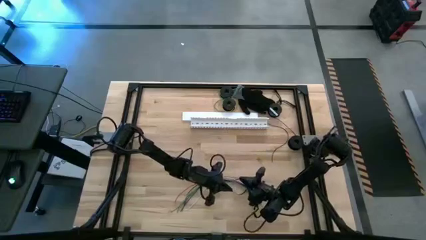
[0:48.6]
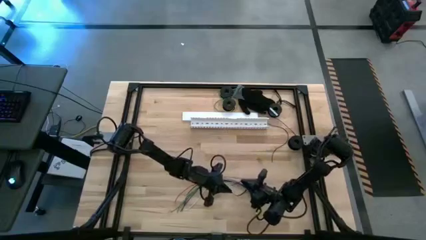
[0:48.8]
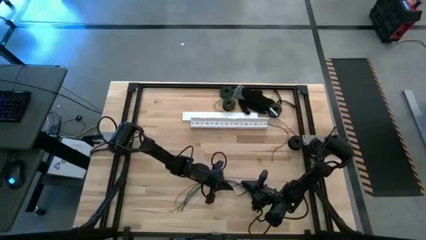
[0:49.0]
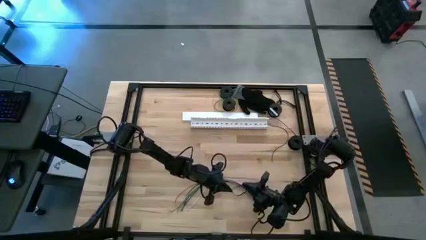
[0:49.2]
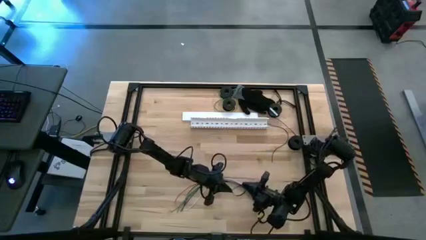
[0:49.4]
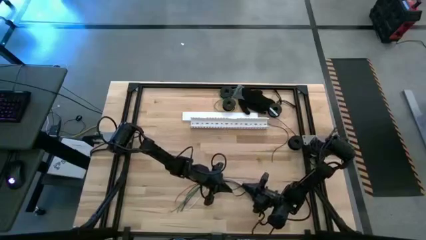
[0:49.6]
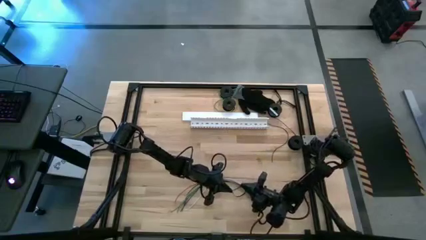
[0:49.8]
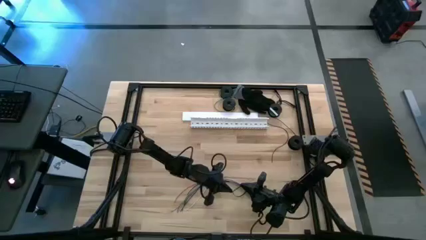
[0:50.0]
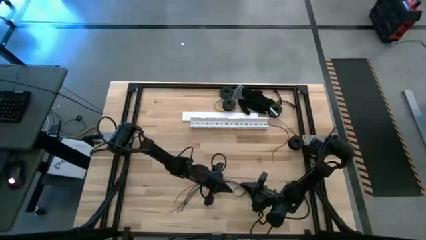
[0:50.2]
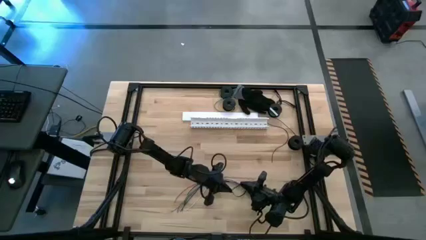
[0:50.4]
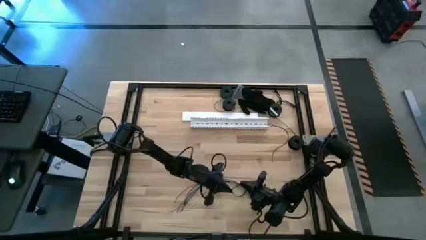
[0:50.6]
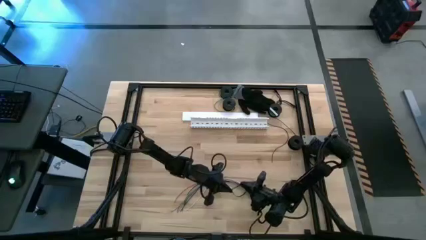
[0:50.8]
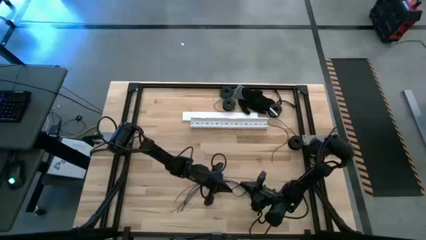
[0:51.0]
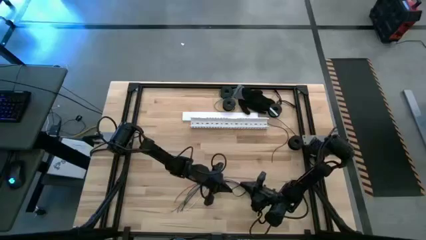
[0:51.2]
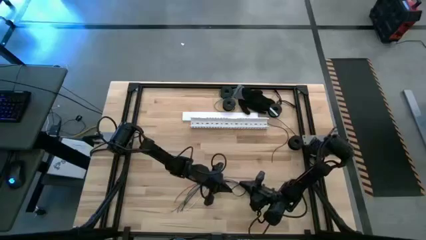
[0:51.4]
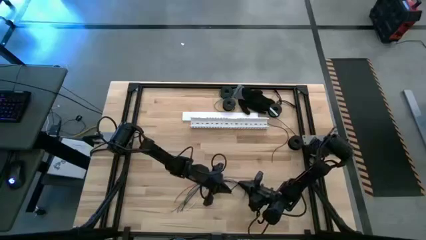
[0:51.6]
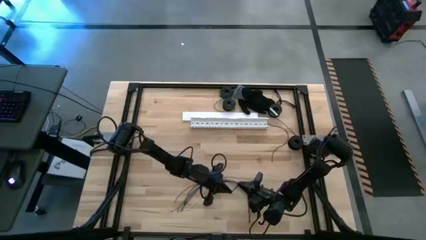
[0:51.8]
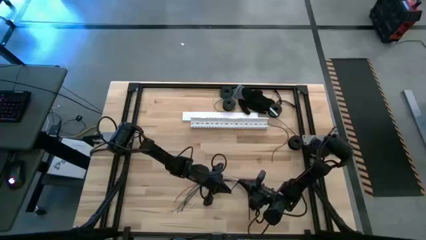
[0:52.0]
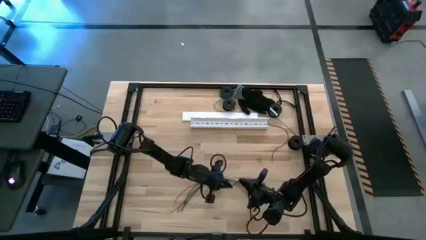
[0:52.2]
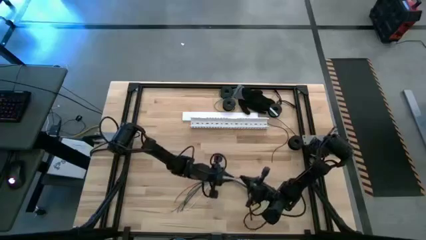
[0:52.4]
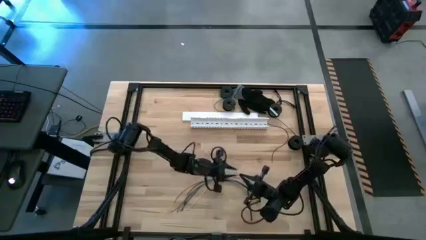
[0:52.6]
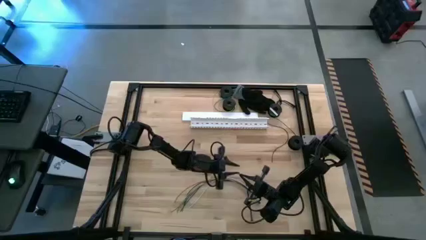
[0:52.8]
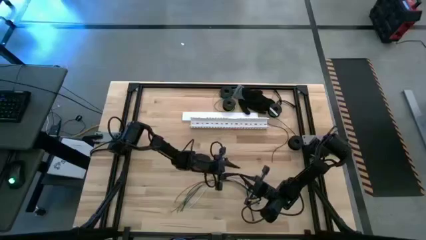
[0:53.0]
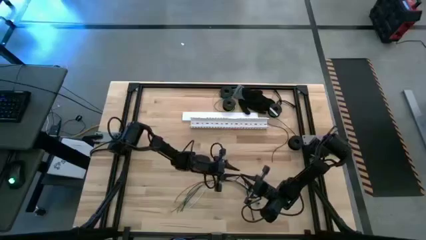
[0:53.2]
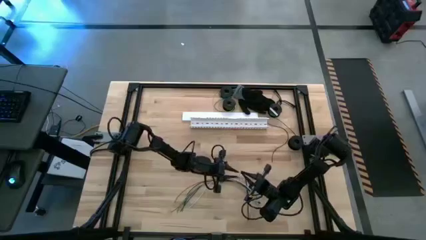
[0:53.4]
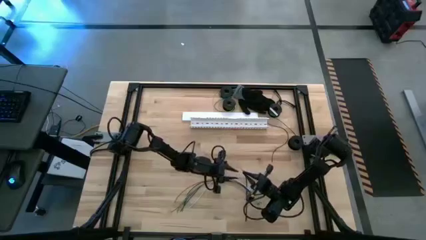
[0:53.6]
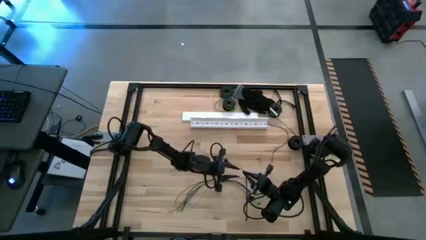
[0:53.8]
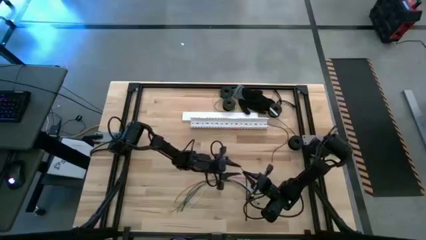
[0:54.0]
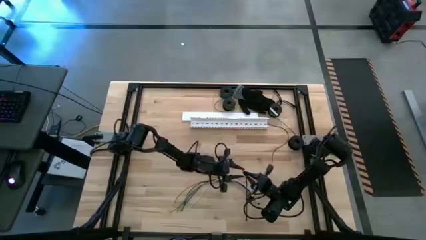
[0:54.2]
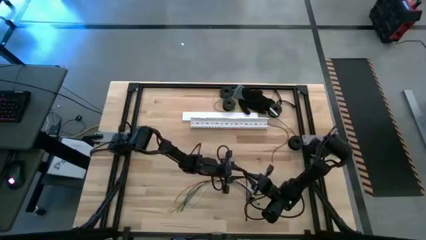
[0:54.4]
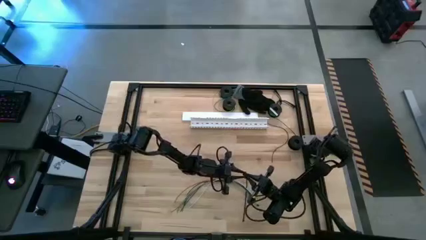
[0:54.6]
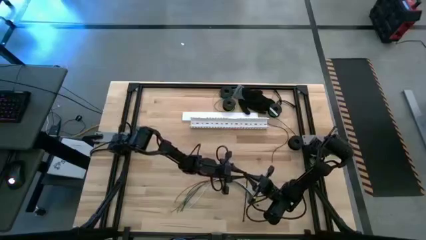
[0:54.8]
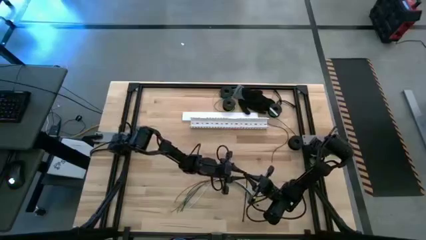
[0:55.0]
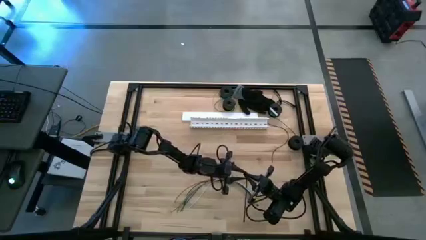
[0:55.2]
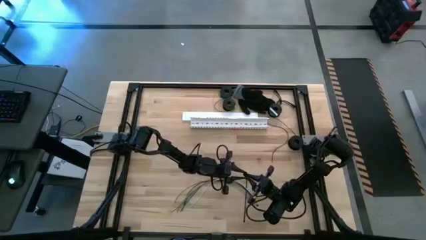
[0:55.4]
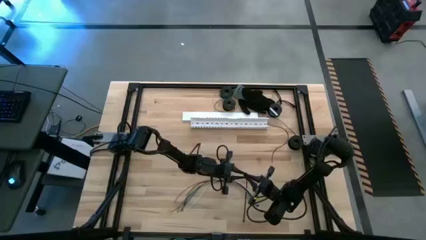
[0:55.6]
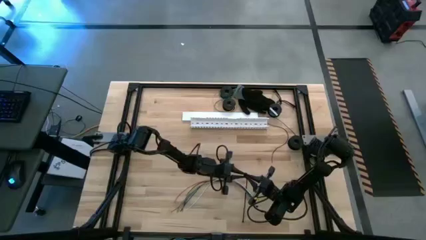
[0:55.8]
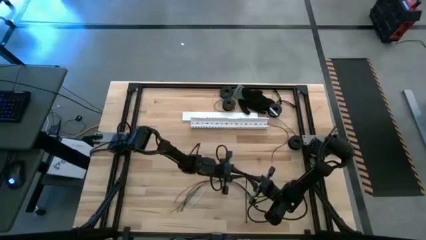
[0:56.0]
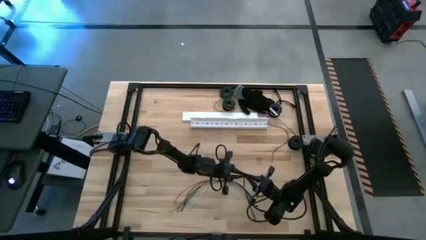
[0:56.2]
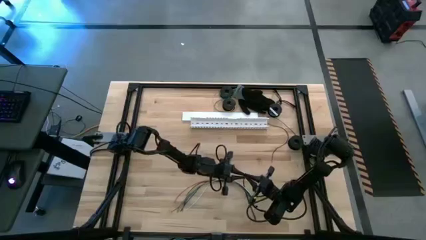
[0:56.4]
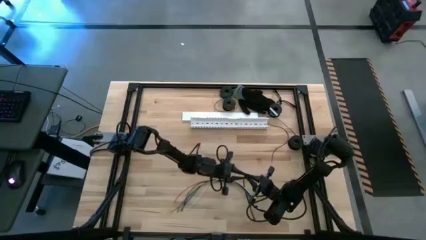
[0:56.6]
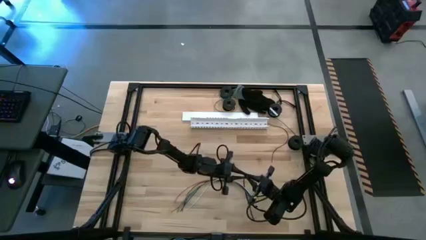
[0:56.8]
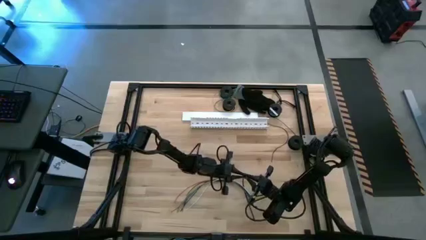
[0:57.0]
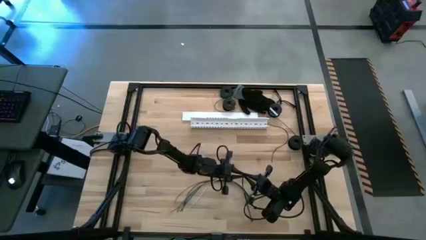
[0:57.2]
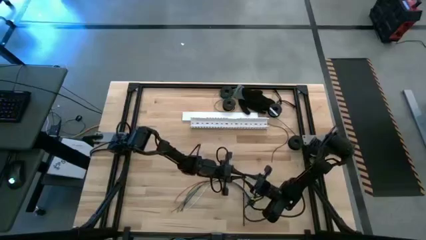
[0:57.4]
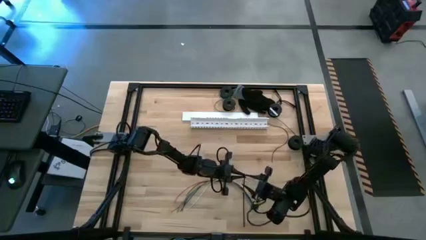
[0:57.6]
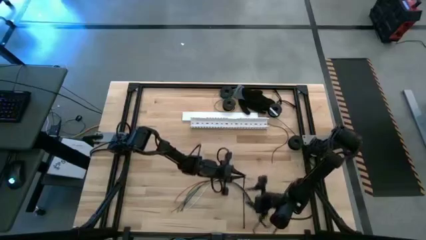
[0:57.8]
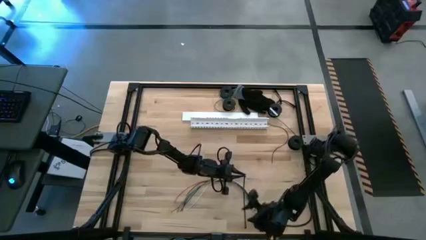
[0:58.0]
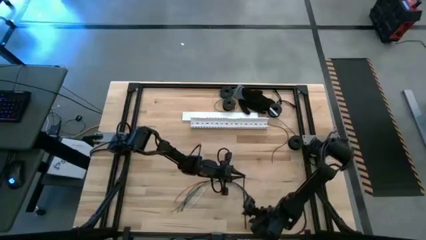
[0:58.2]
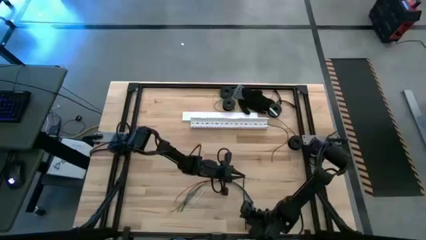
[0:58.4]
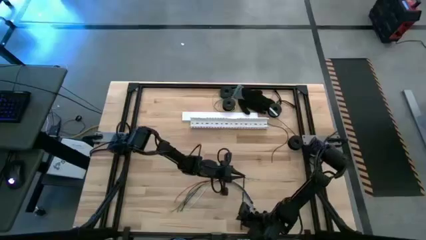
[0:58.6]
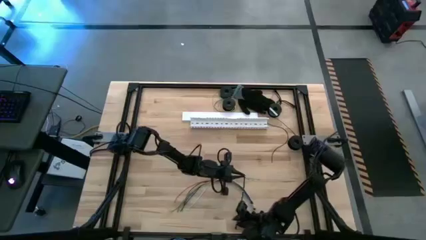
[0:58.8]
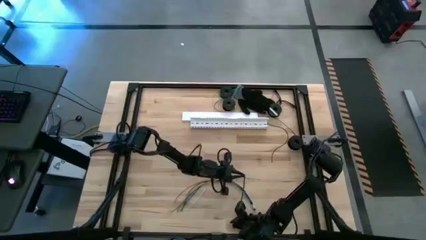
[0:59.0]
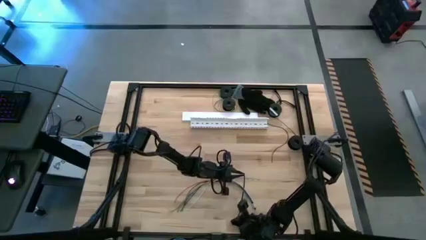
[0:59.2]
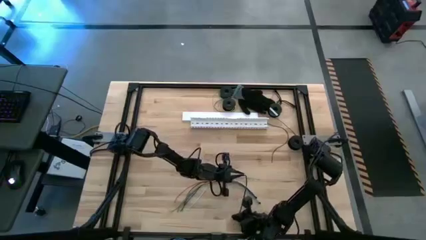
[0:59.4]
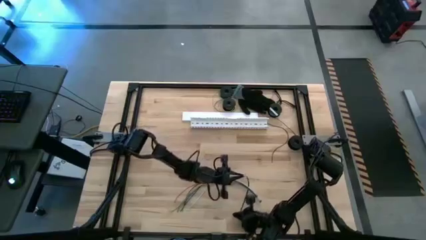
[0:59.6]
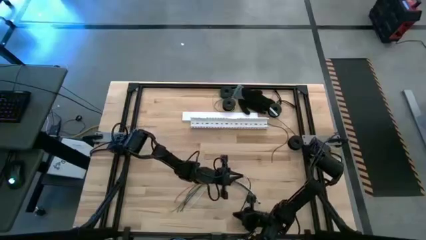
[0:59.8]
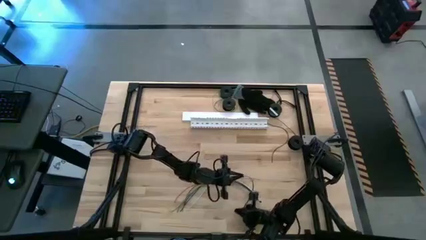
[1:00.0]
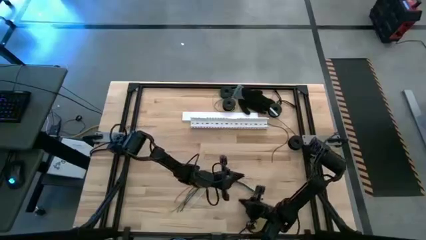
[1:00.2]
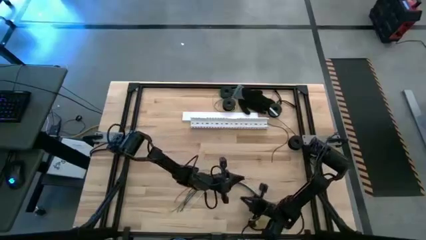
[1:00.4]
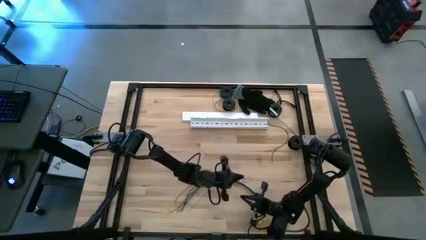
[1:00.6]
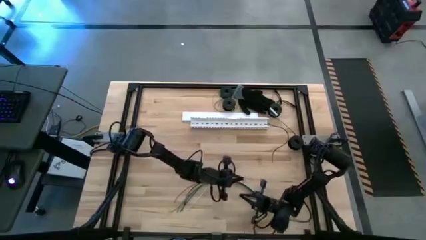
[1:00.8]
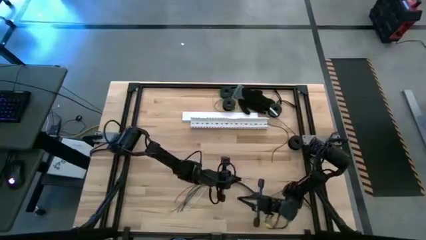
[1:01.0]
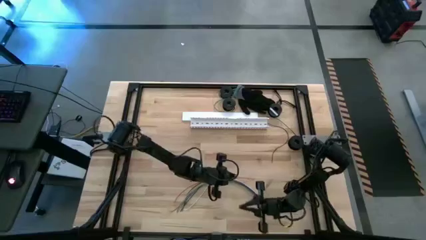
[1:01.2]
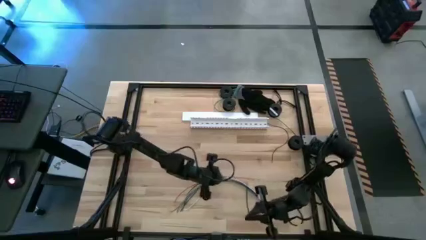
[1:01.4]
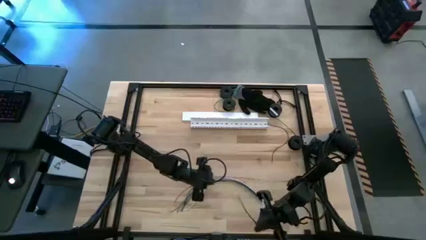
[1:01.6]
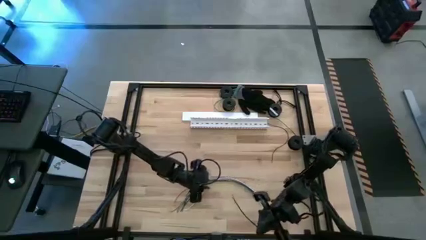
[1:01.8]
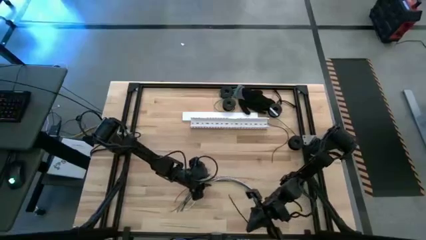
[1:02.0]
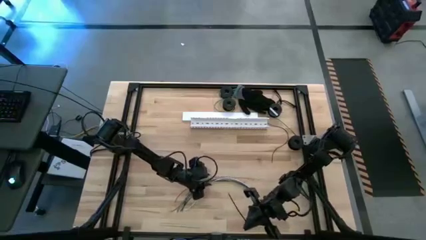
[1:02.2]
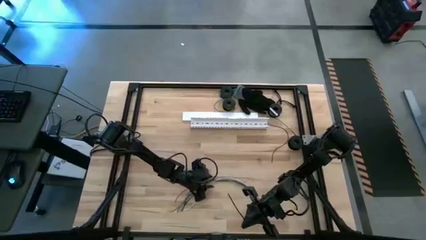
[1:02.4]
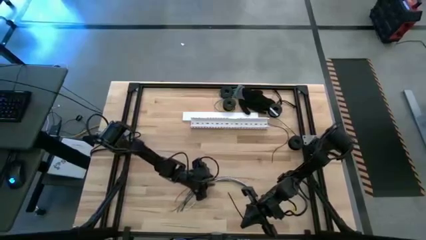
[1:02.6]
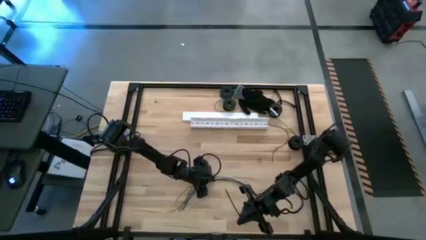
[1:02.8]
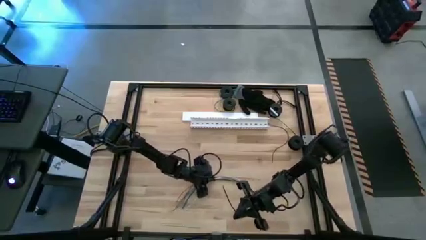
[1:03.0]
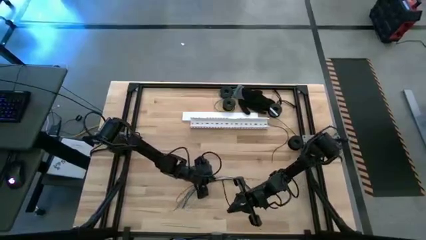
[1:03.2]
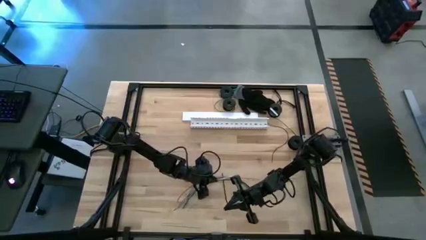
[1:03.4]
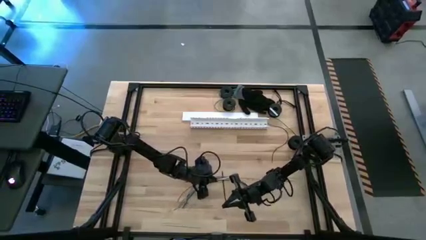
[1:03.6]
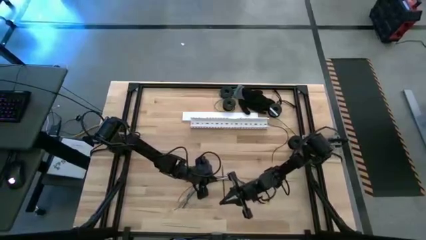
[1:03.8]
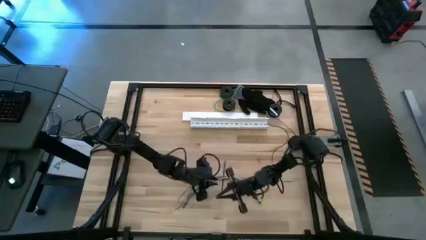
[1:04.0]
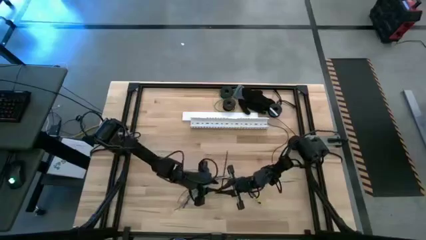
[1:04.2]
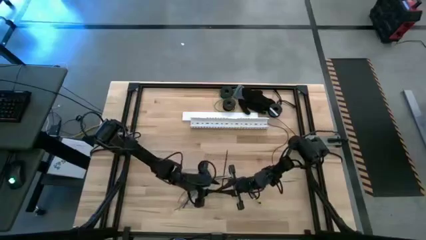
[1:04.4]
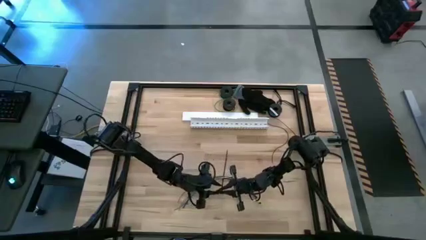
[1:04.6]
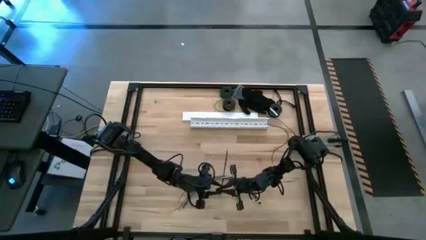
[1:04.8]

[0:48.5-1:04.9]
Task: Ziptie cables
Wrap the cables together using a black zip tie

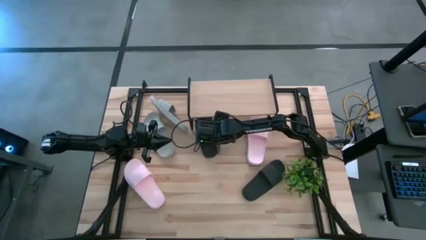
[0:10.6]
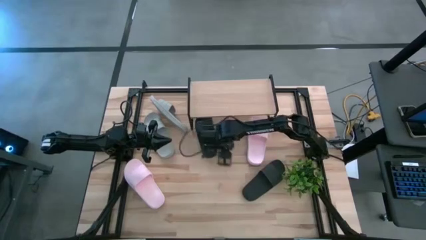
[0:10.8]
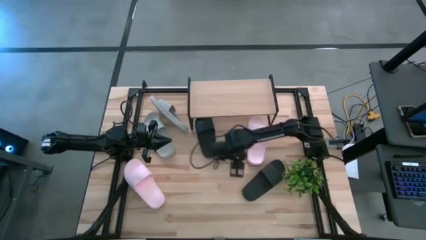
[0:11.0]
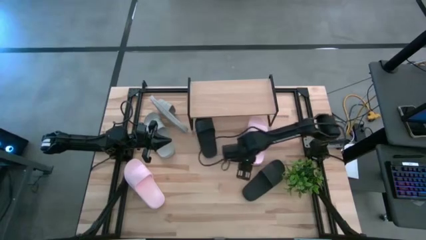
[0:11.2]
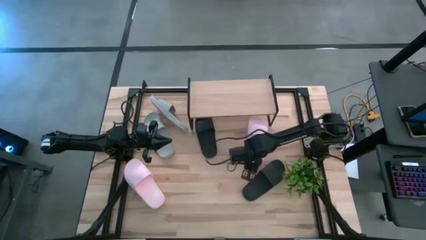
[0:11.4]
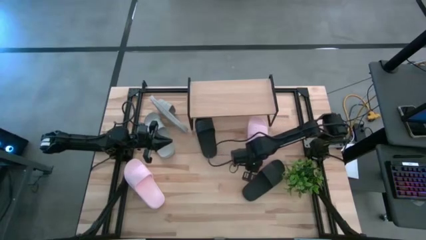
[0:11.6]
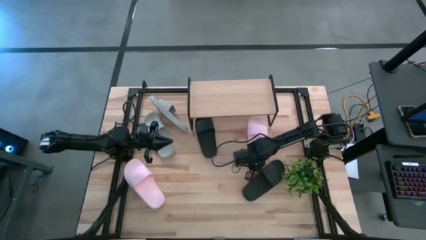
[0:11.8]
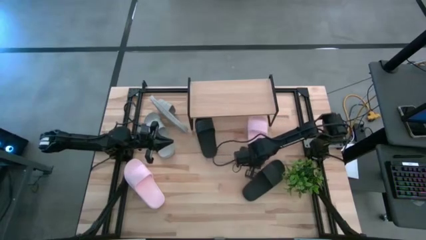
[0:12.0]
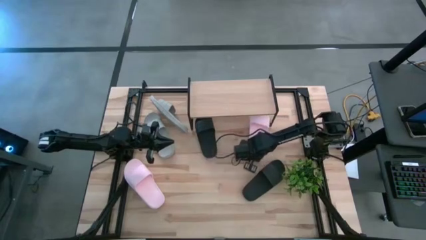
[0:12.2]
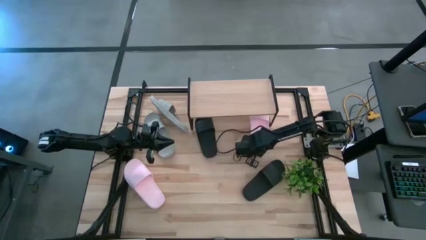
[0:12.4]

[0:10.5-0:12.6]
Task: Pick and place slides into the shelf
Adjust the pink slide under the shelf
